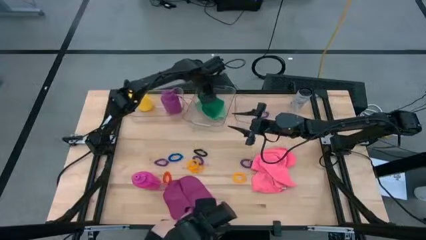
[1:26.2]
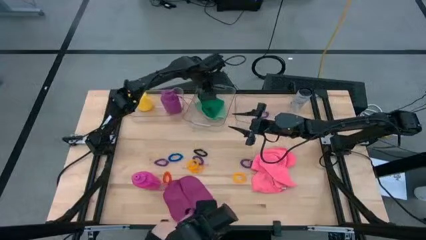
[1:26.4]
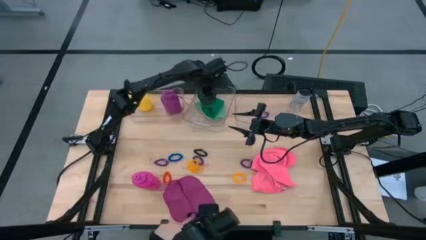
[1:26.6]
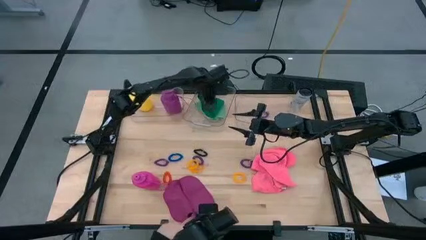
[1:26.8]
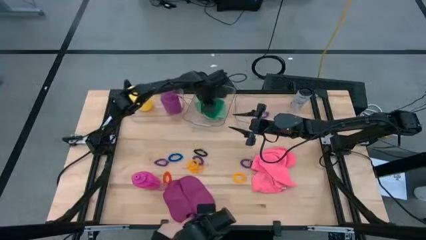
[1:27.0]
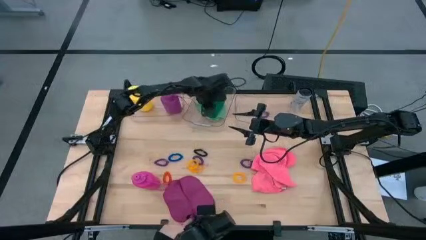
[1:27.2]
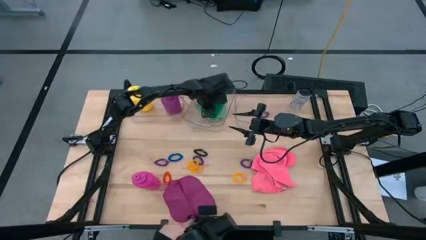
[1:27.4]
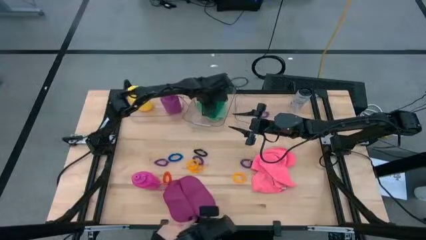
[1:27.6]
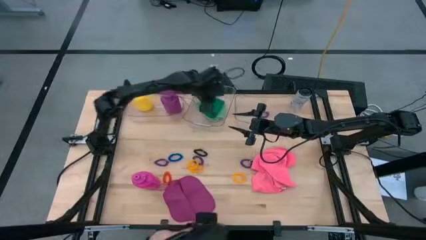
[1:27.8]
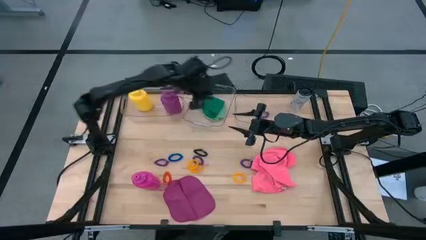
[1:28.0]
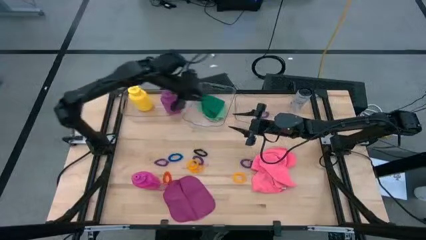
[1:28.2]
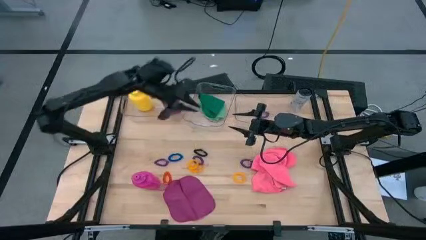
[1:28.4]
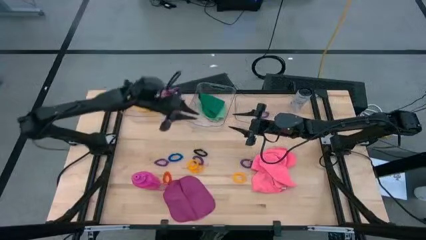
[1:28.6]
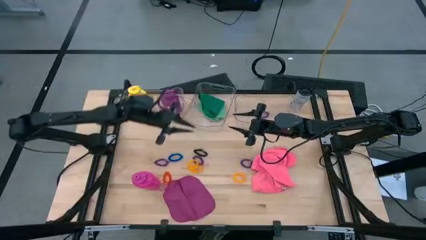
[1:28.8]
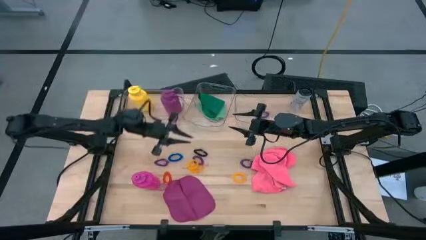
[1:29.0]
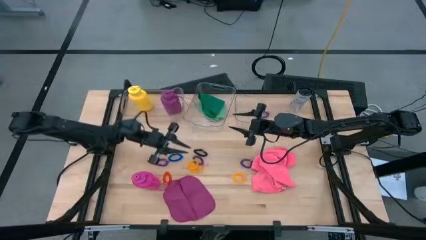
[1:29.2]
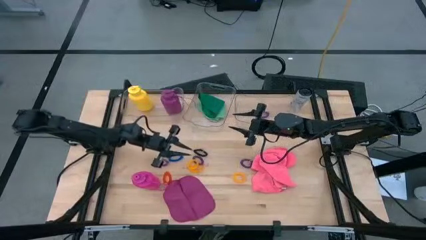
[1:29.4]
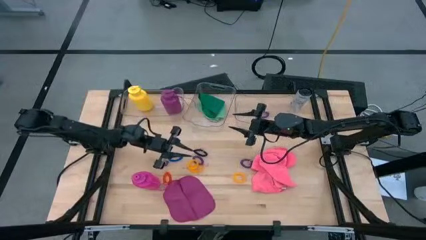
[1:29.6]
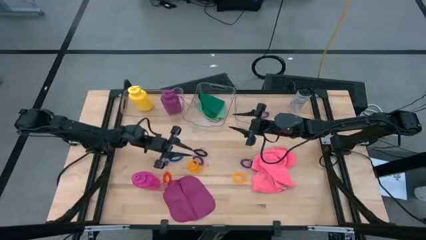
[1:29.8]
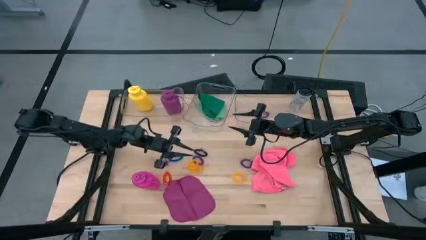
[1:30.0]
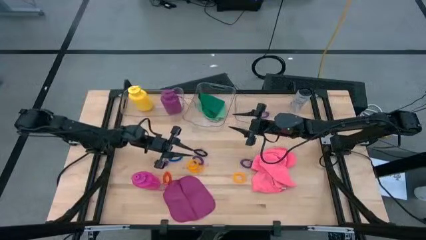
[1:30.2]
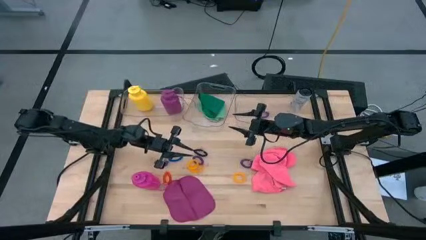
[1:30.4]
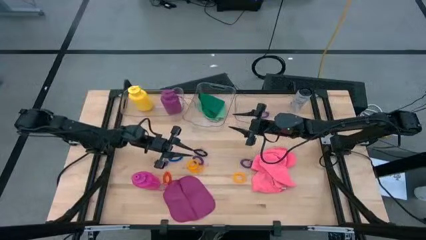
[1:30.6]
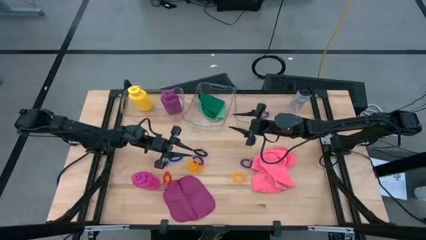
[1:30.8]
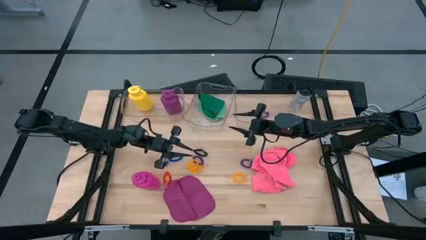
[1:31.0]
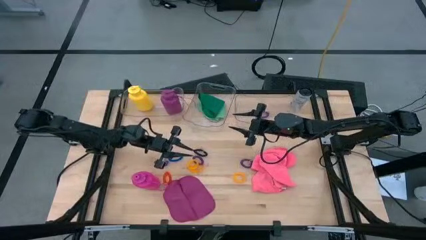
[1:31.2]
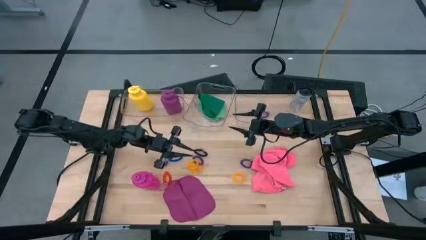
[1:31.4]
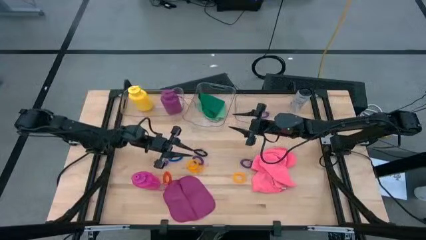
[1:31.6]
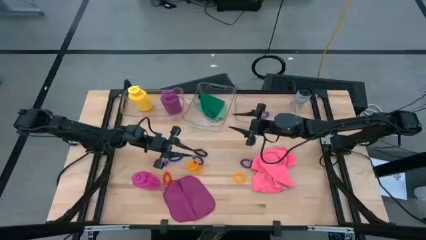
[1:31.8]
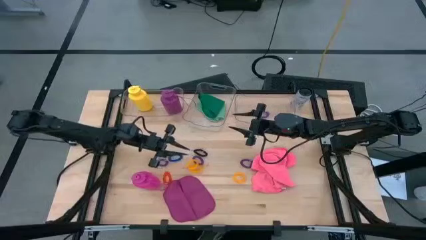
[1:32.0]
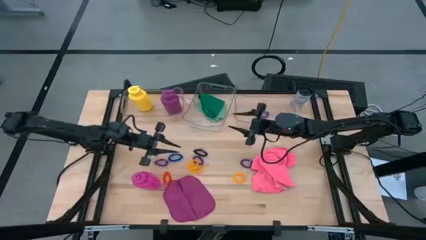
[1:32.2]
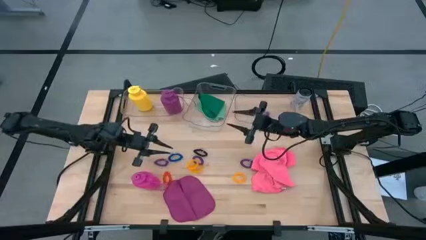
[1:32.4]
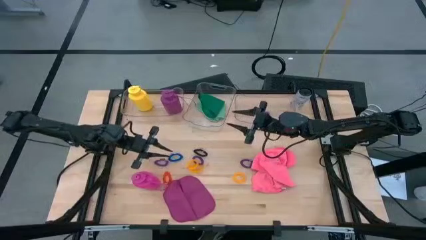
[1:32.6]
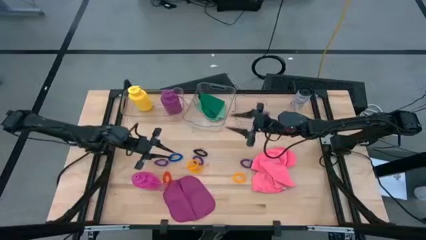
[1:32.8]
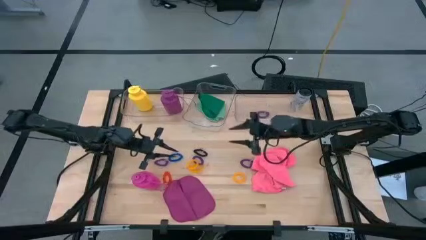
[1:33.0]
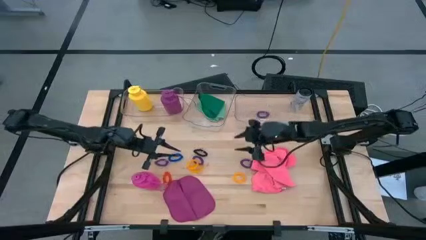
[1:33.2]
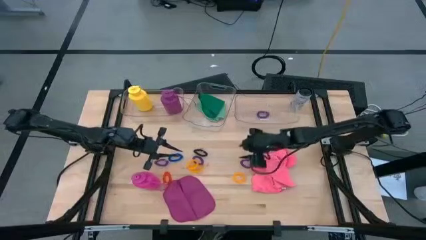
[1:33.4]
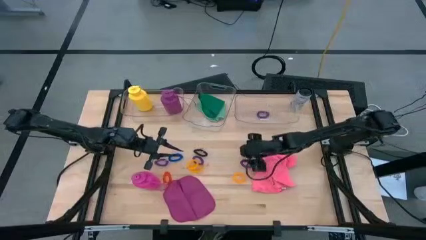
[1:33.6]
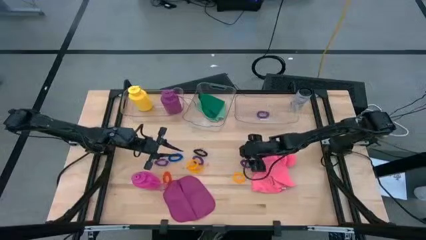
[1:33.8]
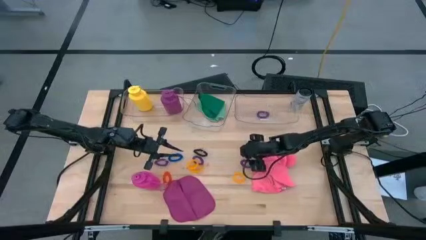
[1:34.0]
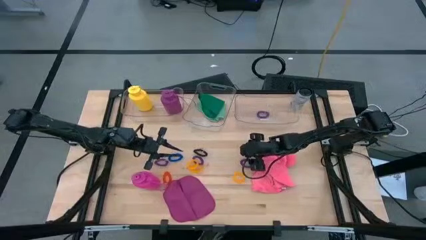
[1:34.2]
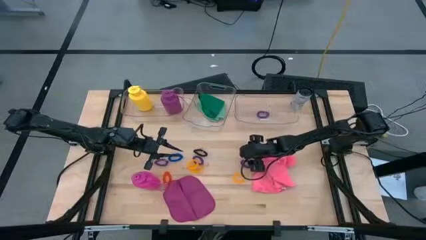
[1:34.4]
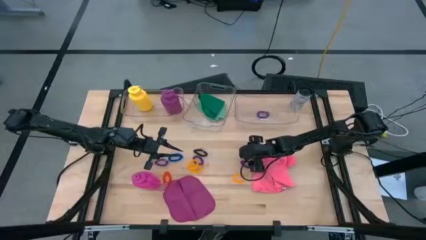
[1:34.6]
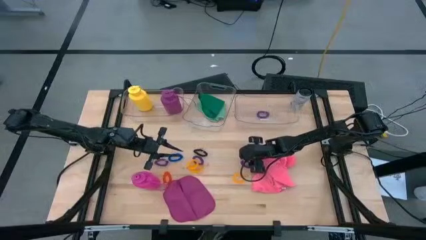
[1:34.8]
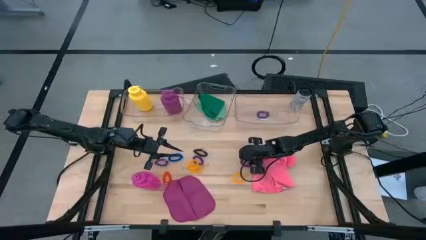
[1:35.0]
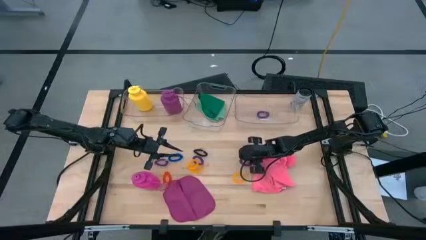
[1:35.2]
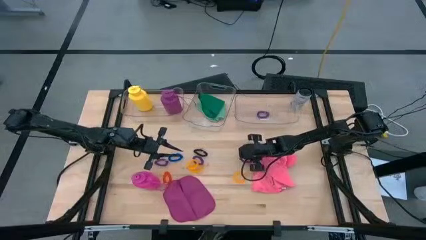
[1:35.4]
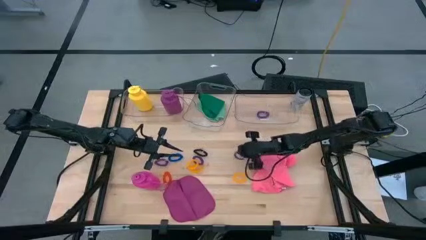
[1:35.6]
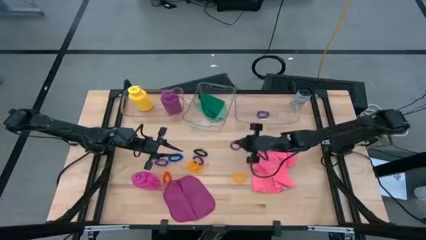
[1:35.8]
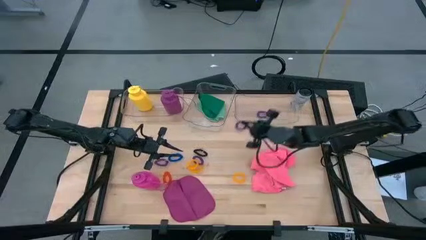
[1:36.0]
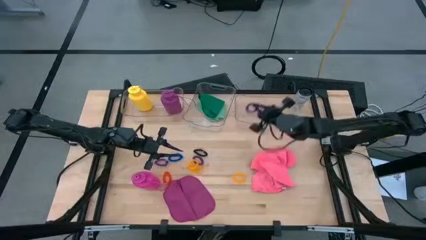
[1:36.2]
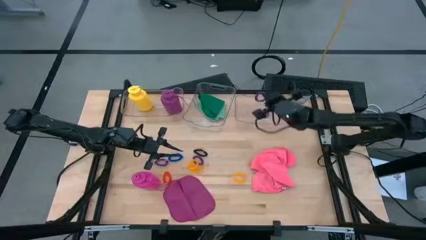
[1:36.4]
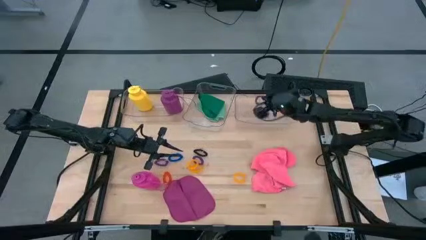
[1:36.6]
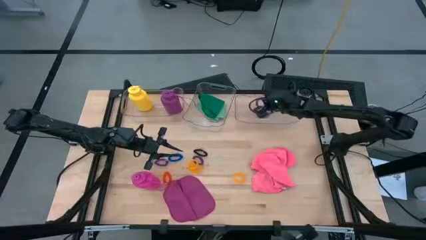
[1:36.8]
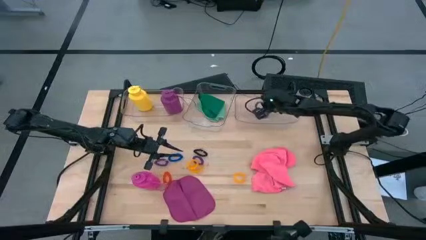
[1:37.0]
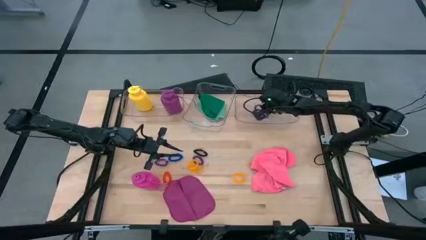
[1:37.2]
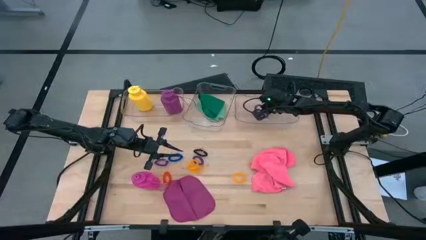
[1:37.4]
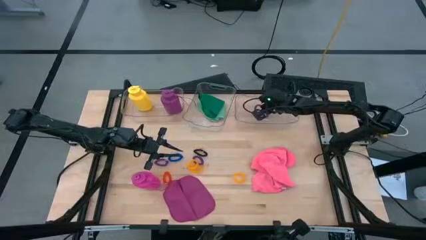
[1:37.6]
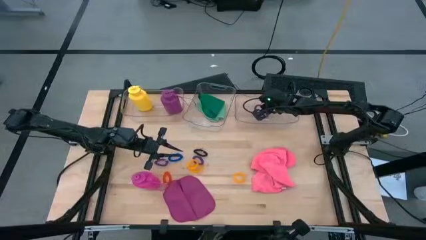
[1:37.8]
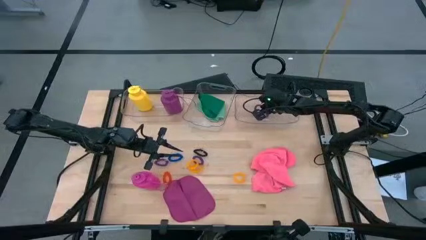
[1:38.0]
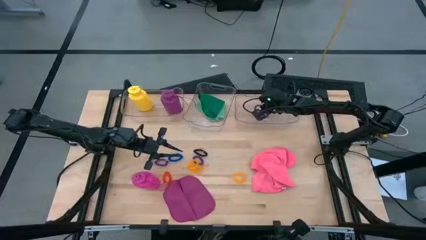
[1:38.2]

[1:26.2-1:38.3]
Task: Pick & Place Sports Items
Put the purple spring keychain into the right transparent bin

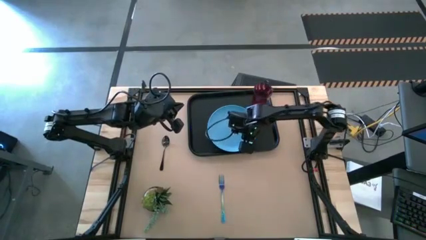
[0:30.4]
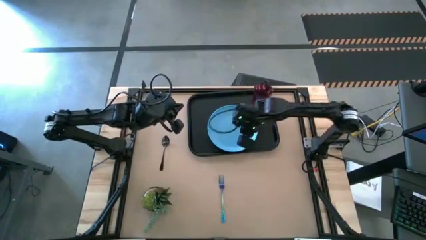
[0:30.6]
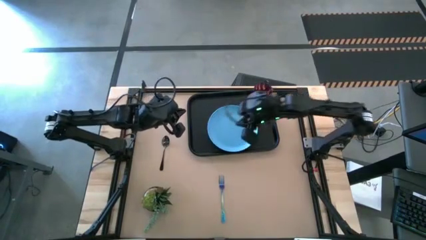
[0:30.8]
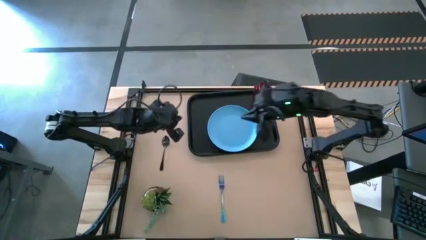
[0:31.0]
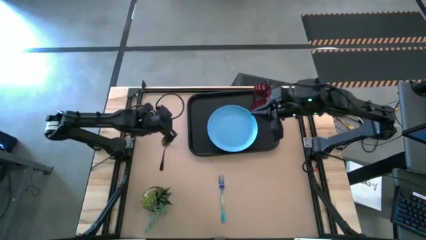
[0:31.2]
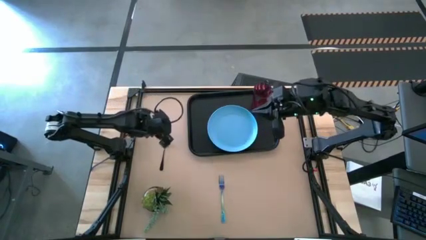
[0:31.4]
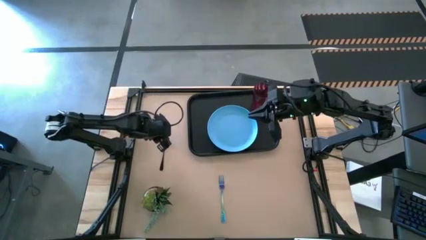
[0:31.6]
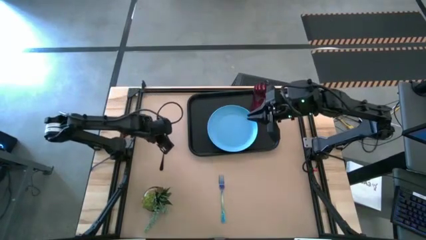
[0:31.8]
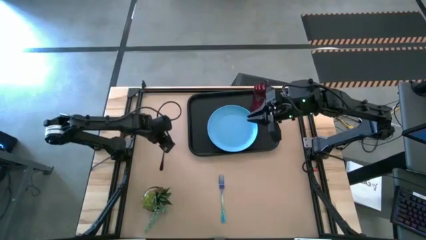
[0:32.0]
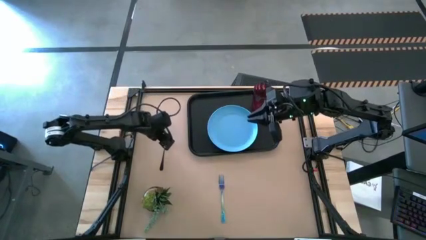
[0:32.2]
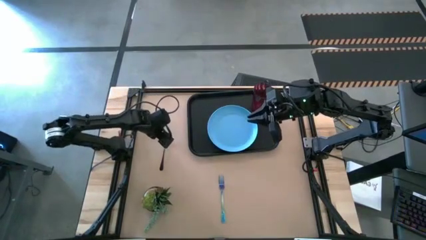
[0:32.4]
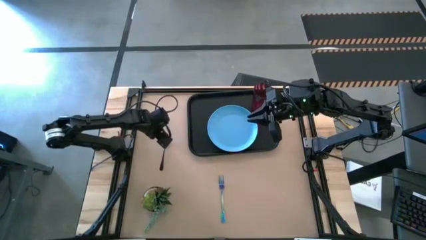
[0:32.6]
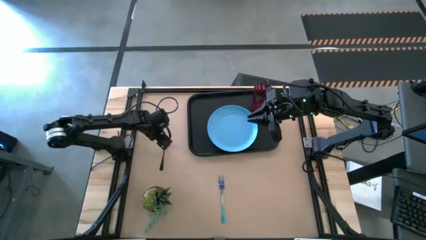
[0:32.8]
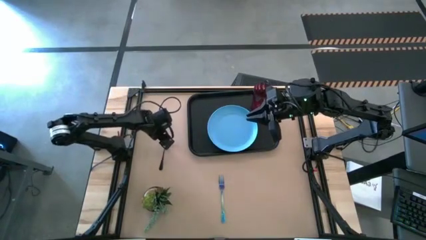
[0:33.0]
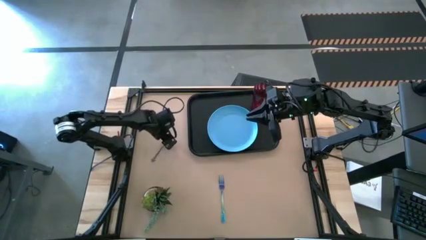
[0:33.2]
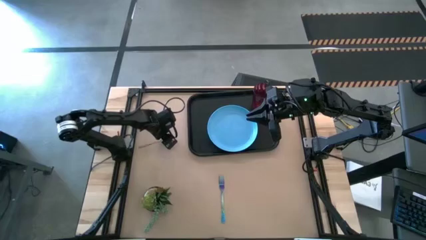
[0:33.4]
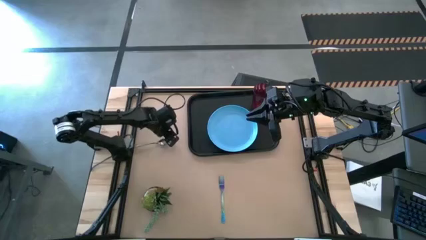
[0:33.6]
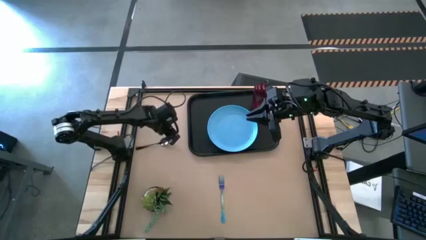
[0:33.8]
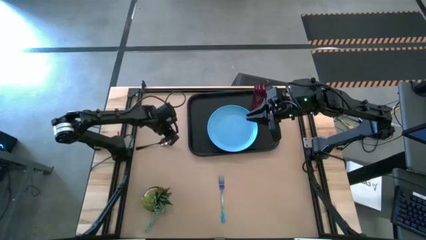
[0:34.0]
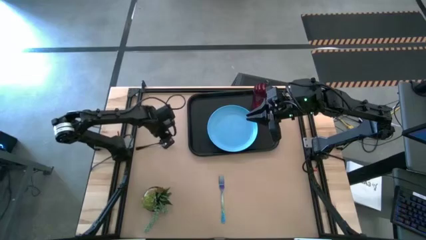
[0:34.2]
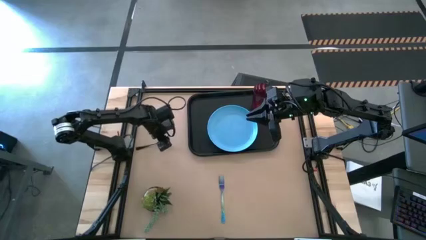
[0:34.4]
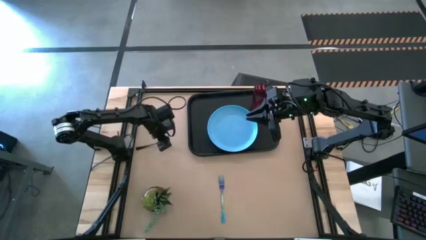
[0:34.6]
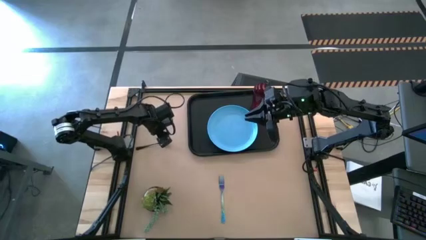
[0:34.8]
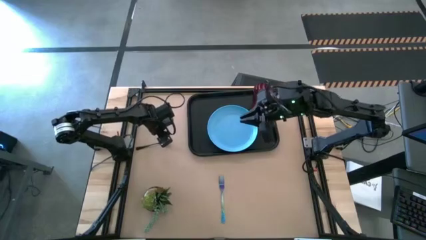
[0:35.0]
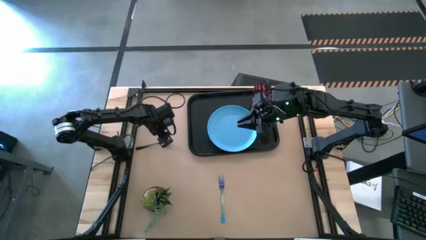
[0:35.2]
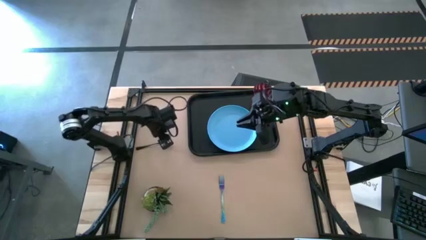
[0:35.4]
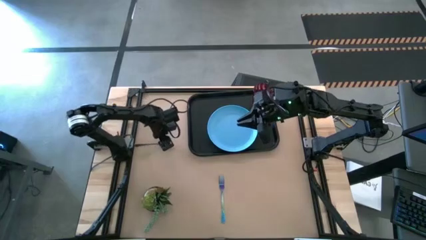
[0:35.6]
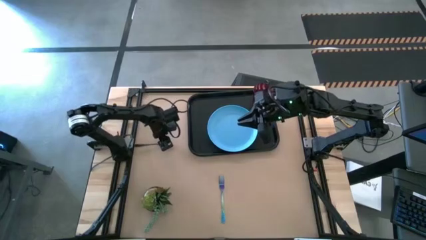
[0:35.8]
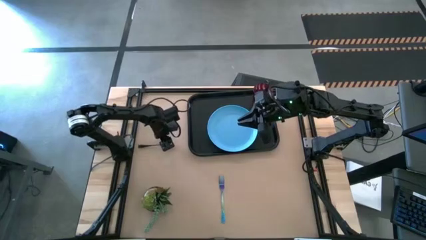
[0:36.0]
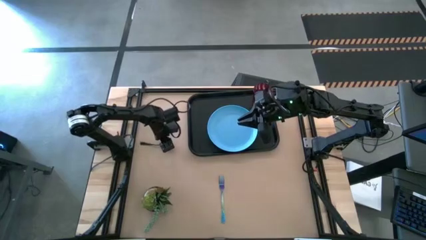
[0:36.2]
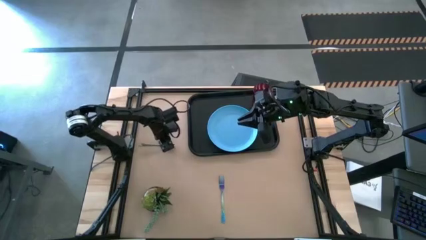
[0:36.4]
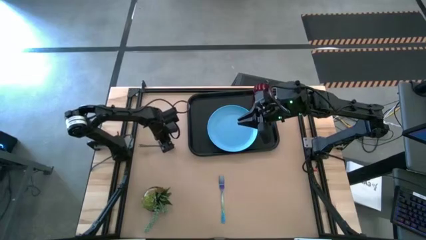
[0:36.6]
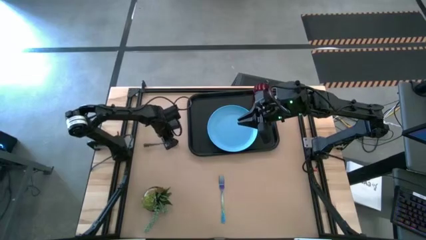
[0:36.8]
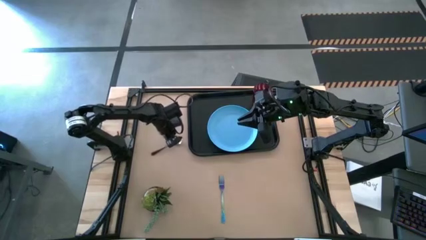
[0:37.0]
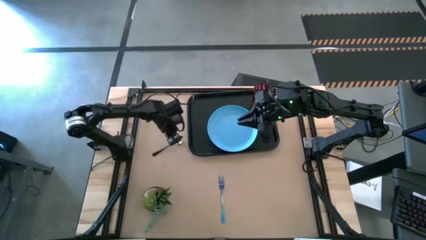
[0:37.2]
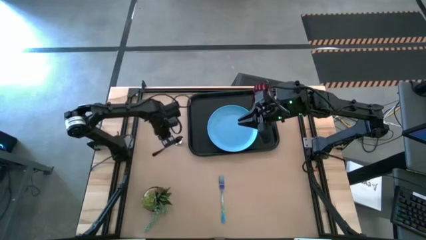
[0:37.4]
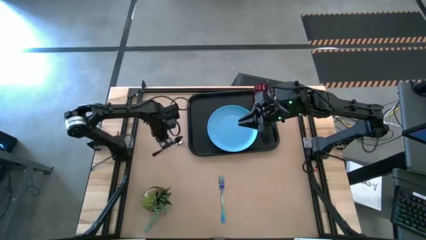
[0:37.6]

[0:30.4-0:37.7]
Task: Pick and place plate/cup/fork/spoon on tray
Put the black spoon on the left side of the blue plate on the black tray
